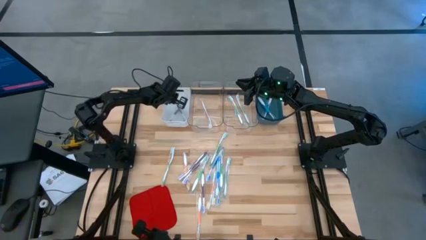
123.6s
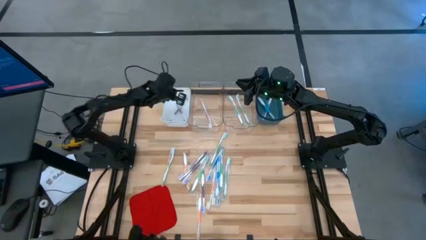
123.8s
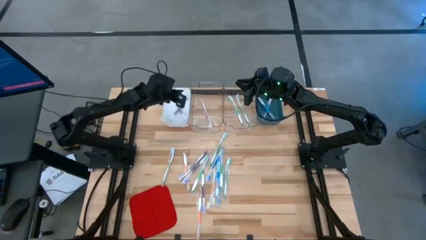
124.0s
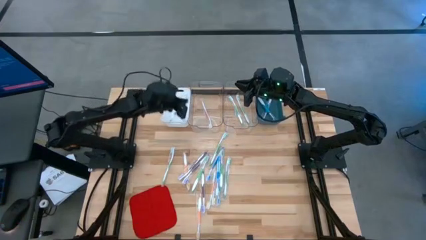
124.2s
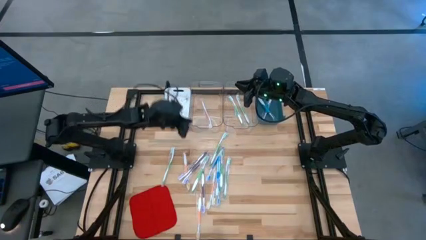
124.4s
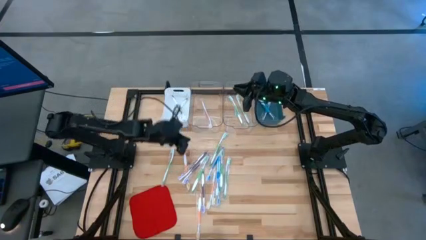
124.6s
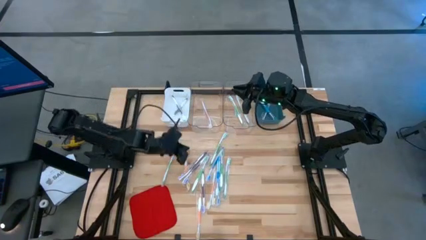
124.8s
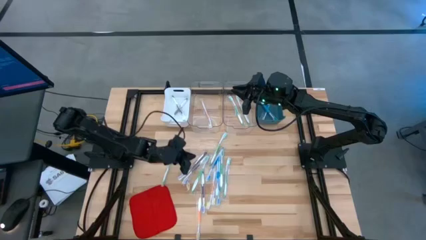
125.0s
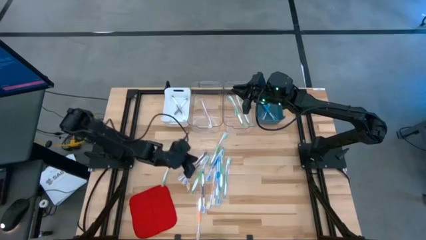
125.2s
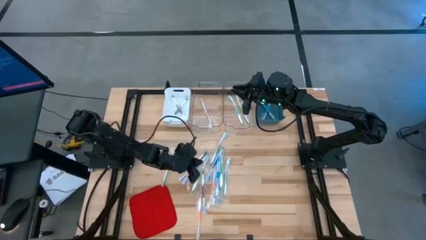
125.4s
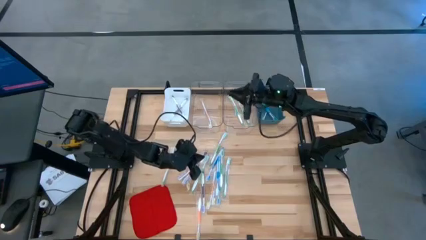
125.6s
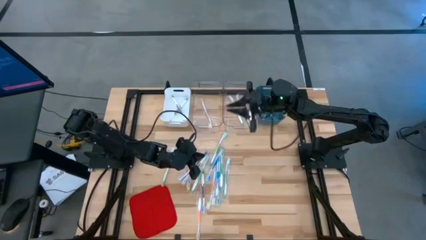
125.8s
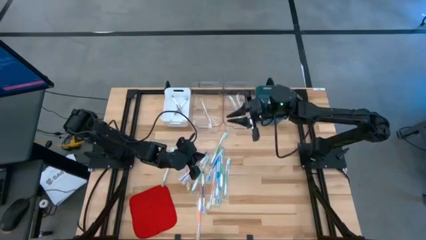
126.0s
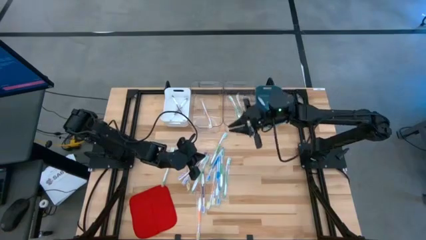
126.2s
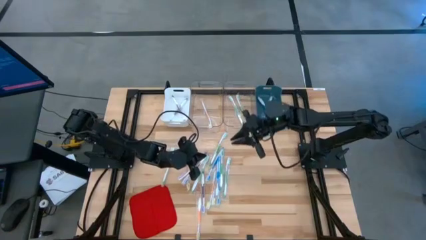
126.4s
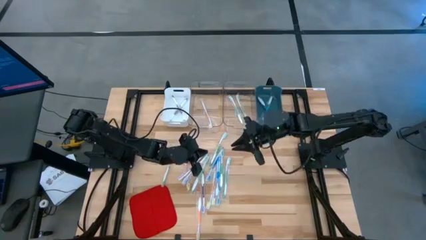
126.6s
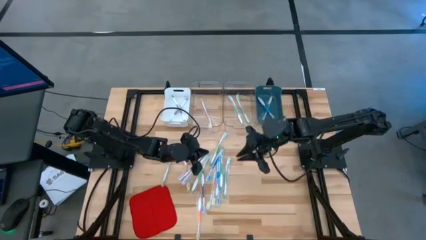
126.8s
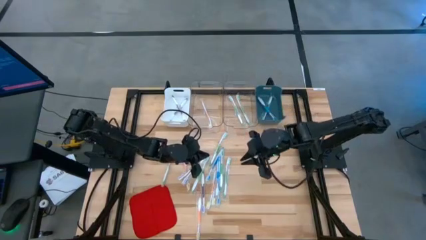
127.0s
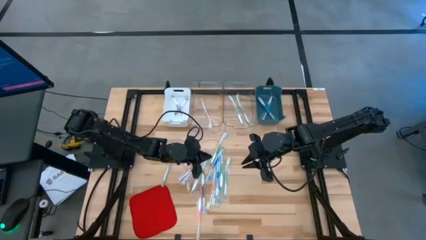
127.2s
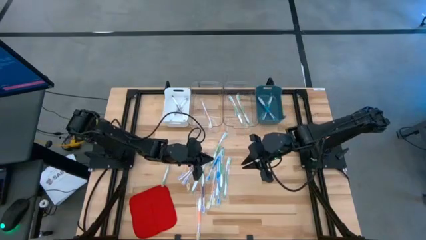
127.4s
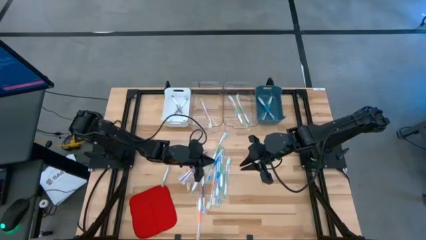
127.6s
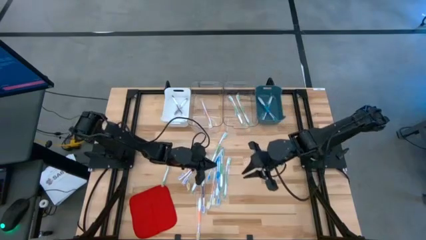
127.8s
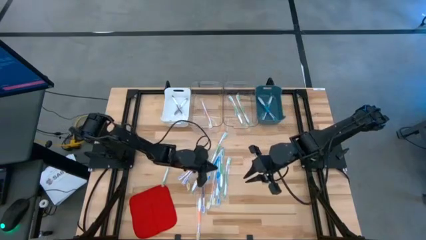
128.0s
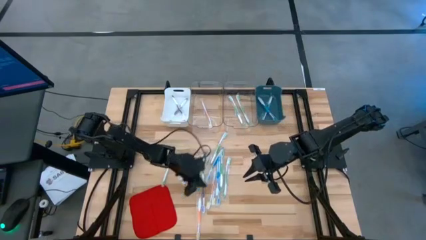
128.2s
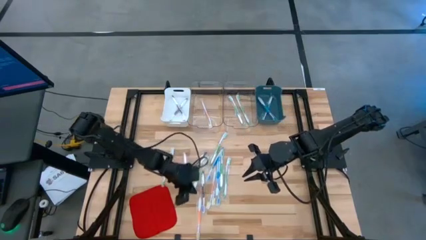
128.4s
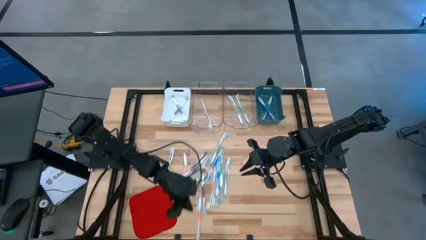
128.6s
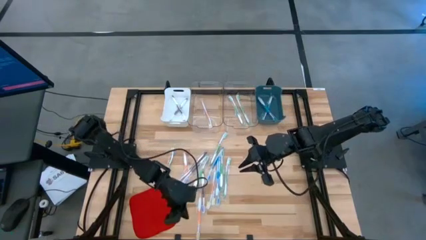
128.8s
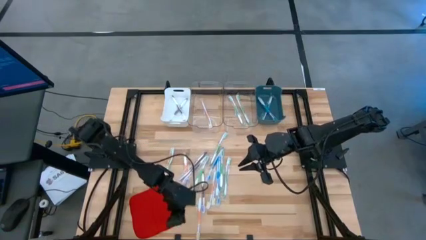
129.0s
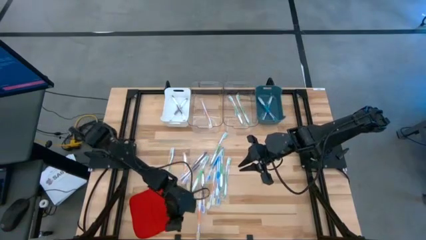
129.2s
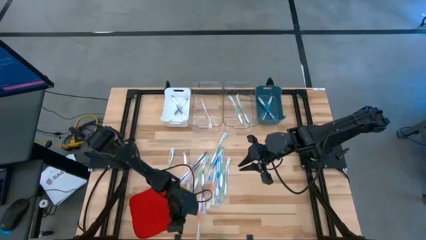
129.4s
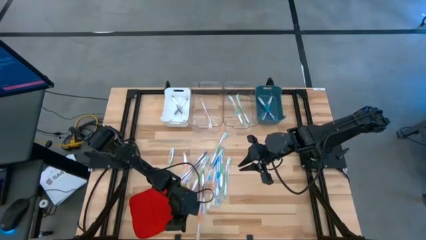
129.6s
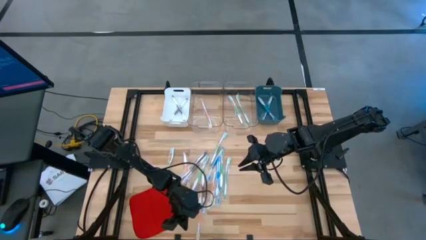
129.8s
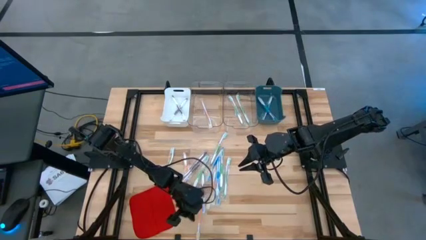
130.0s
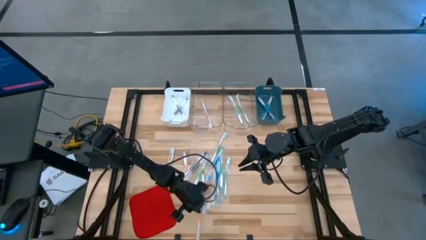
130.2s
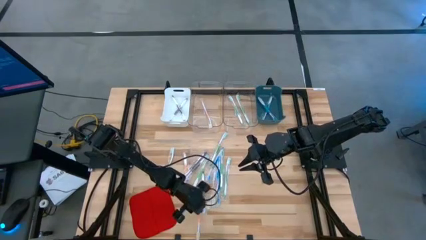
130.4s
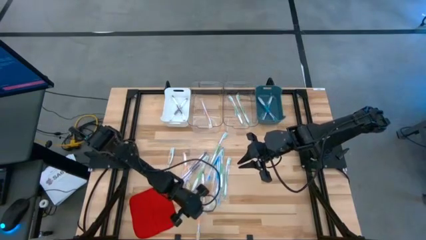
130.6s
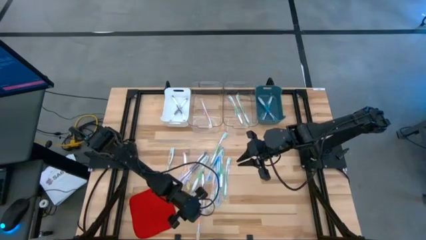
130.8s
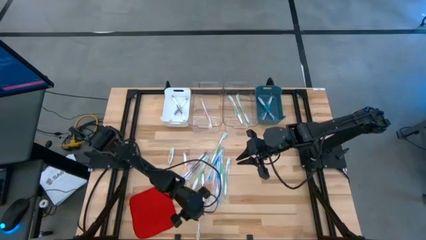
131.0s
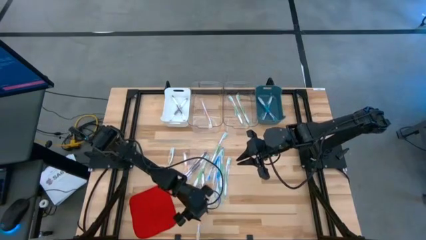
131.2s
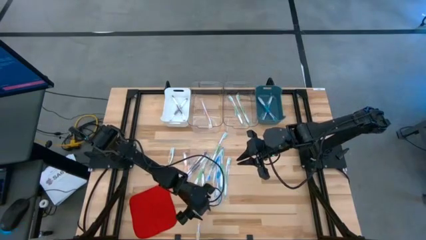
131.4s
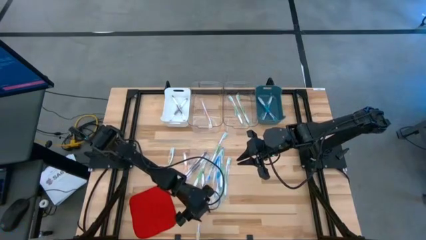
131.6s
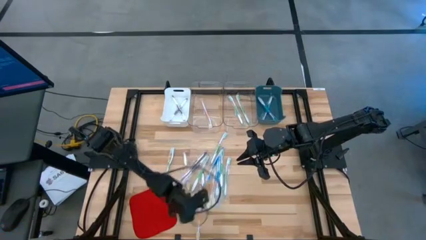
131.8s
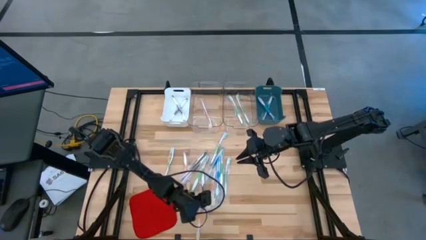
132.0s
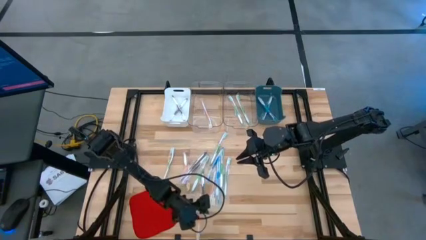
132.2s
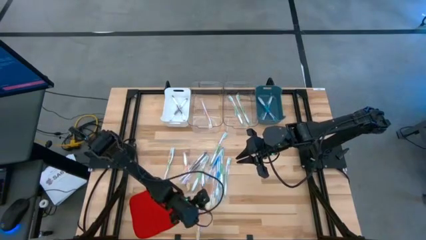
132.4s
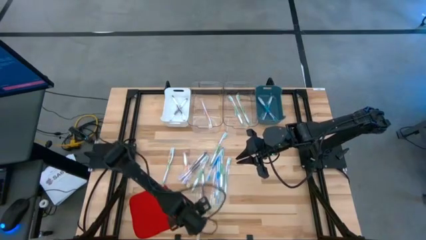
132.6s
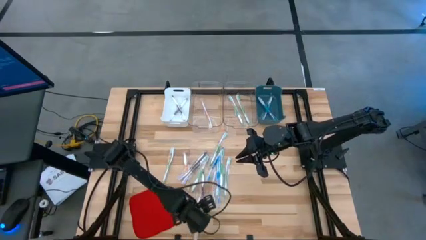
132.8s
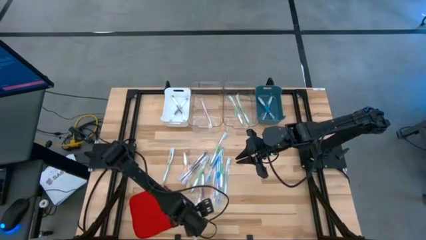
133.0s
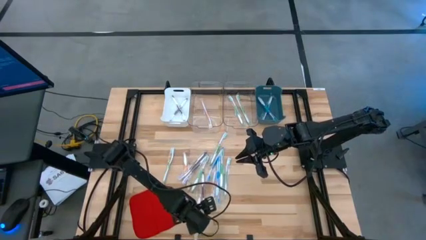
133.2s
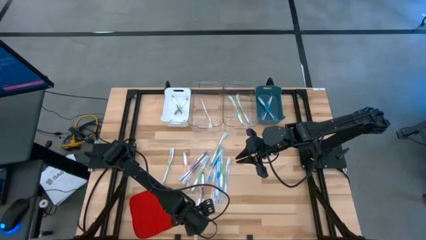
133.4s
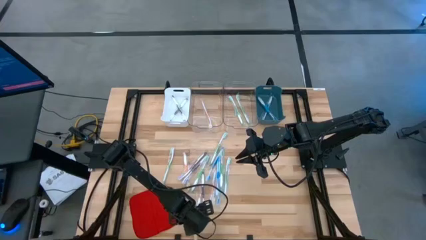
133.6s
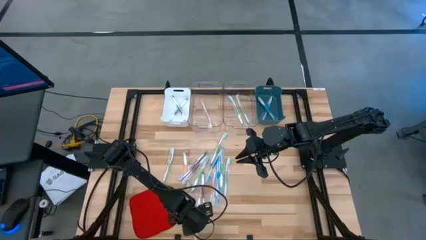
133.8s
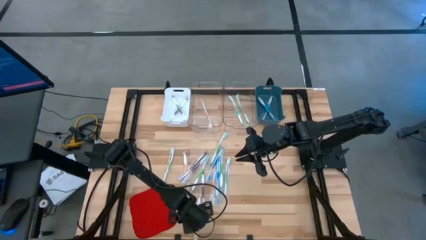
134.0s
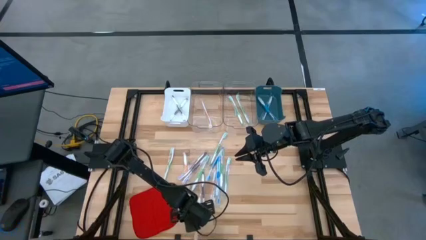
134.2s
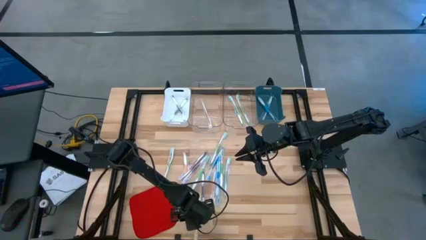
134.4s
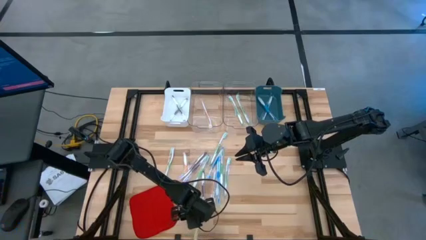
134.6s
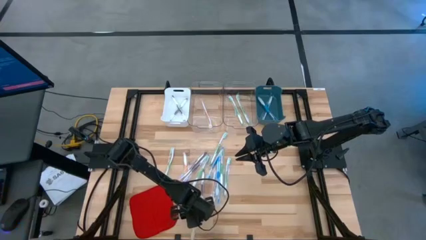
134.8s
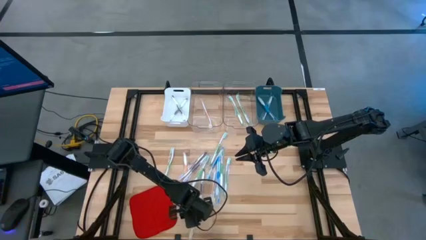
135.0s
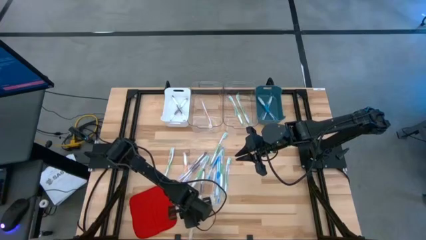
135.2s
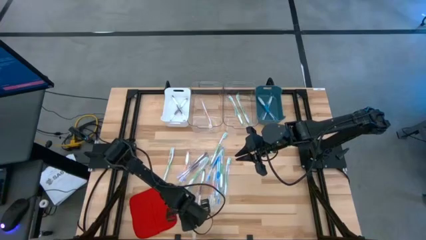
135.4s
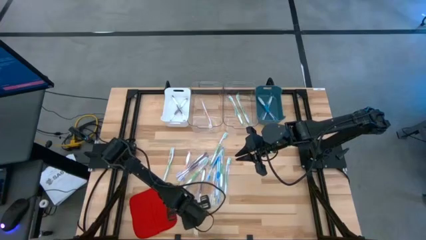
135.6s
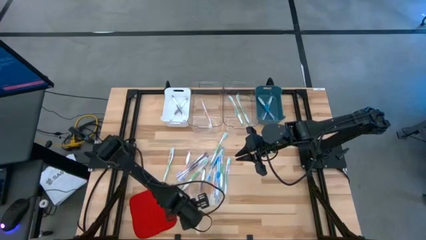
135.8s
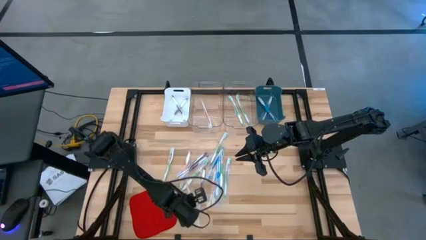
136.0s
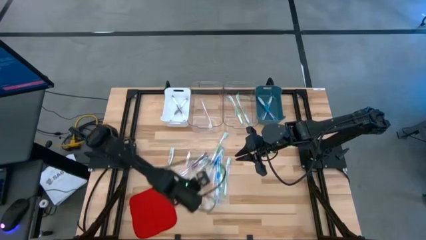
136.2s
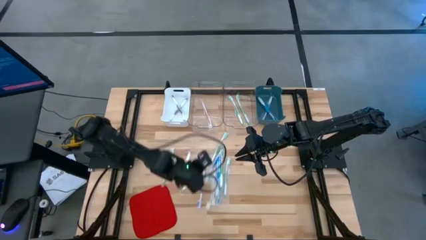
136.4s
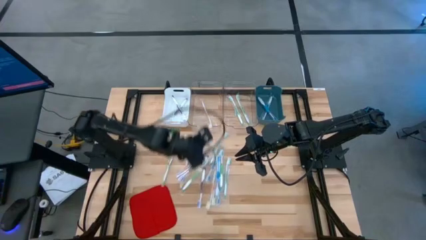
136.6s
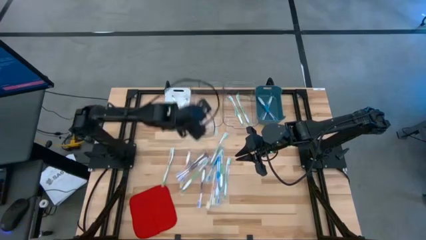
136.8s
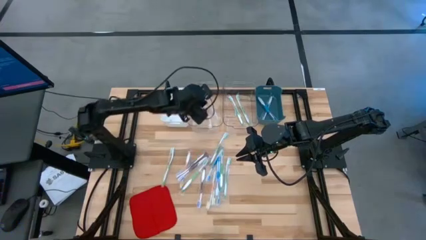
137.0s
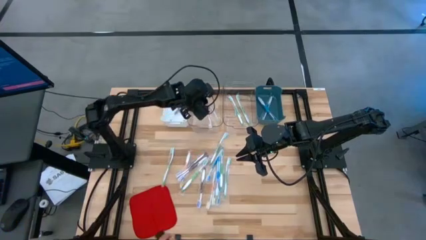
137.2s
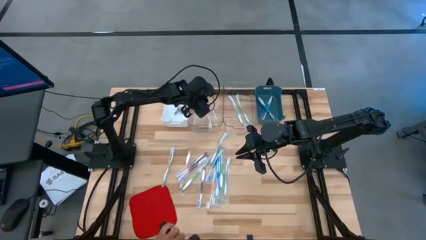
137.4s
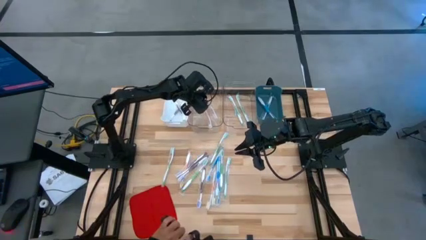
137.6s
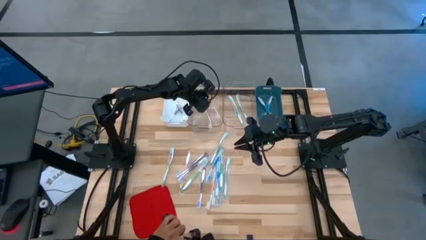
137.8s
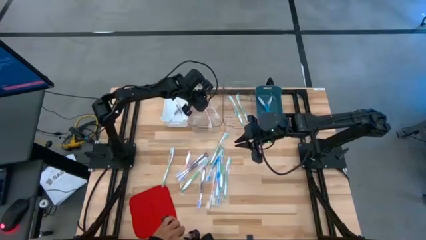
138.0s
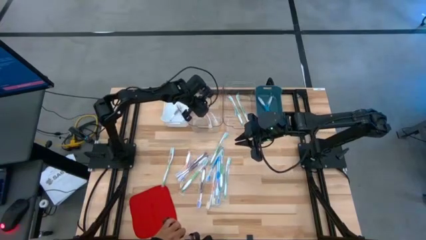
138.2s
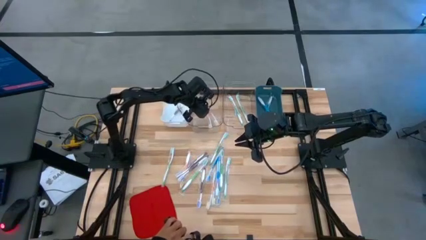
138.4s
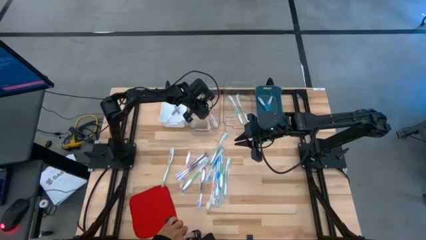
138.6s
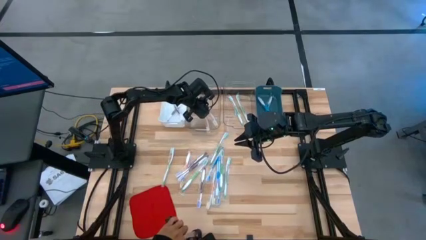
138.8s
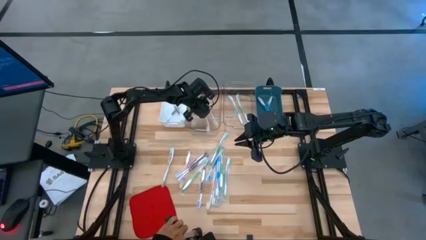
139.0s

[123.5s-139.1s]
Task: Pick & Place Toothbrushes
Put the orange toothbrush into the left transparent bin
